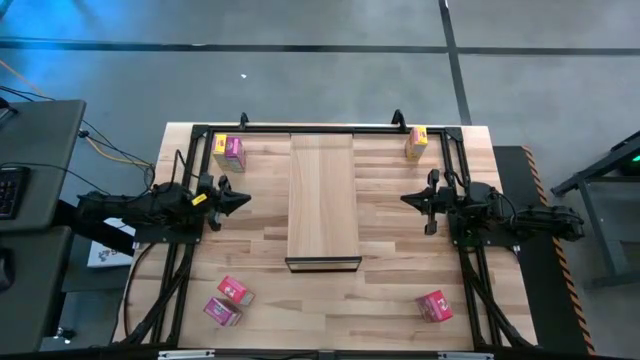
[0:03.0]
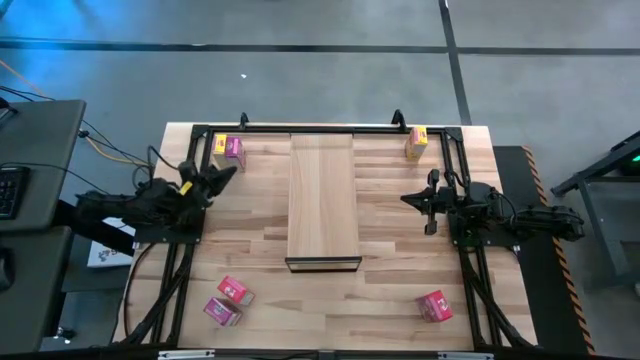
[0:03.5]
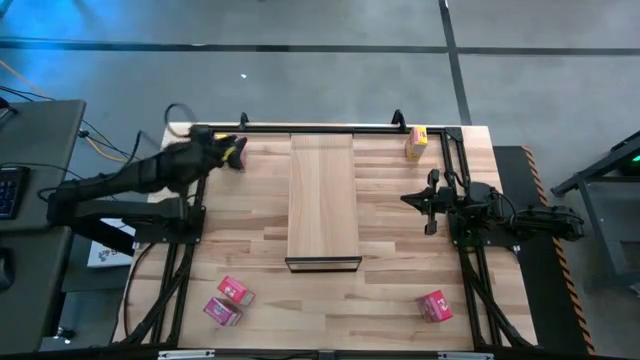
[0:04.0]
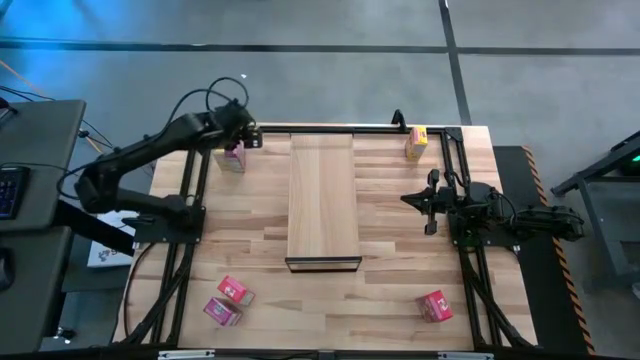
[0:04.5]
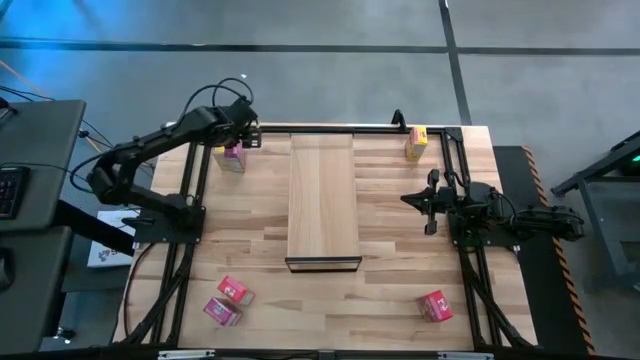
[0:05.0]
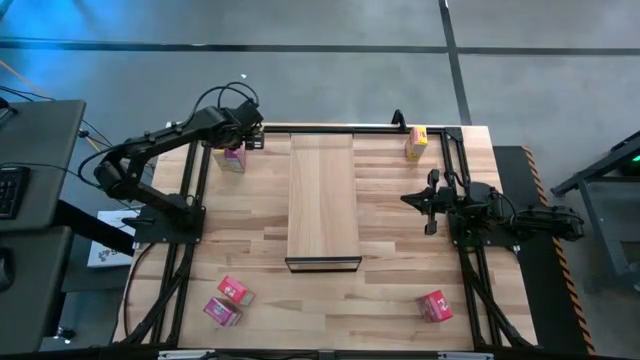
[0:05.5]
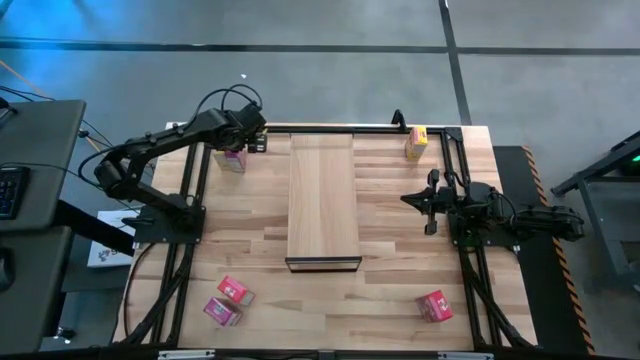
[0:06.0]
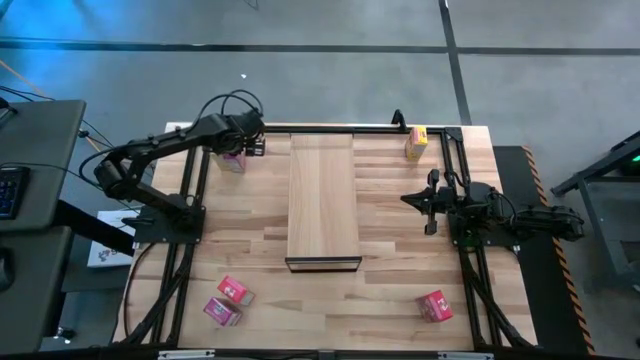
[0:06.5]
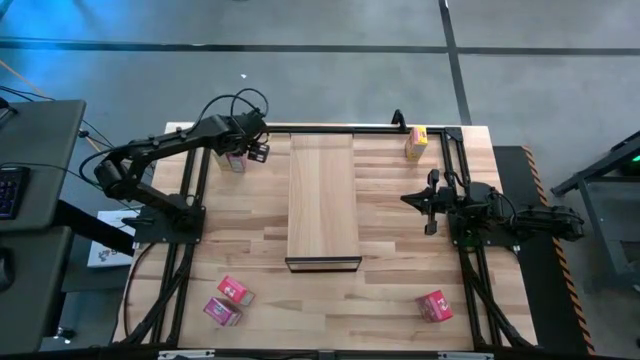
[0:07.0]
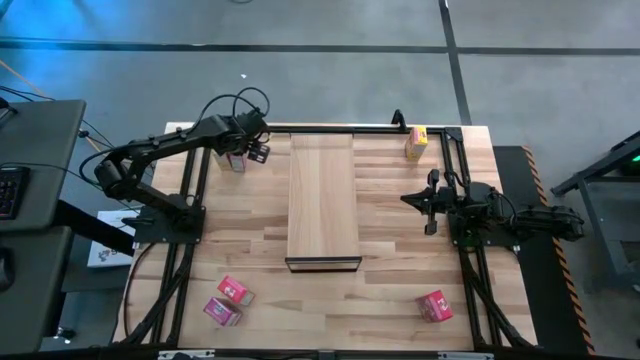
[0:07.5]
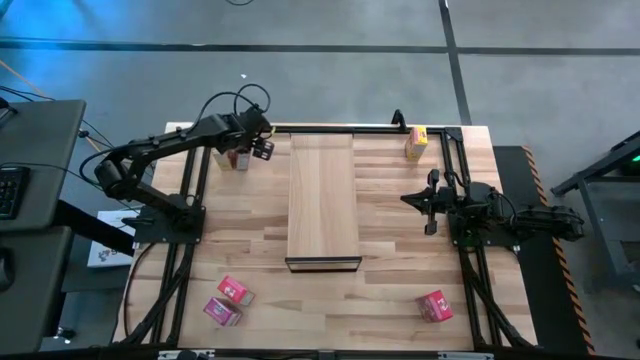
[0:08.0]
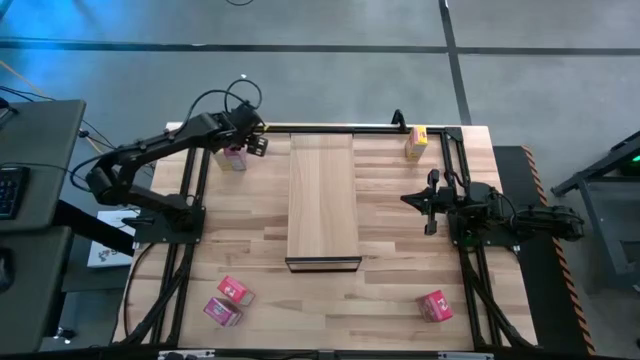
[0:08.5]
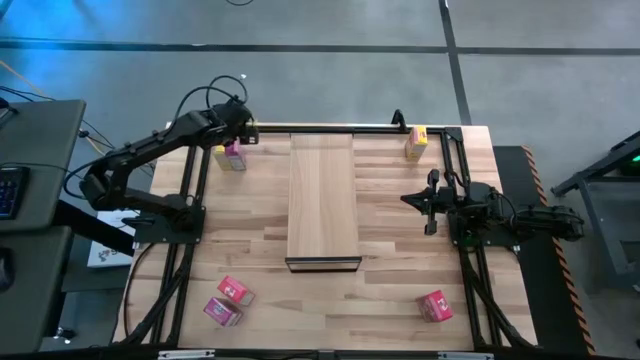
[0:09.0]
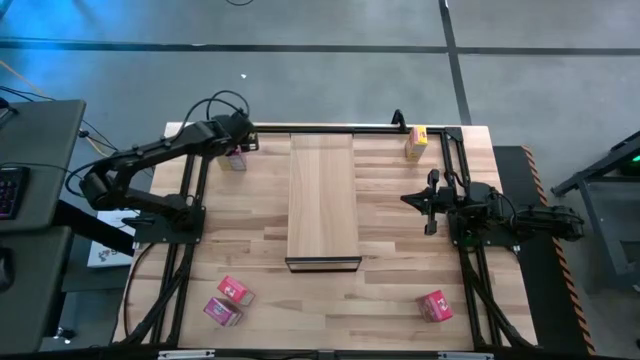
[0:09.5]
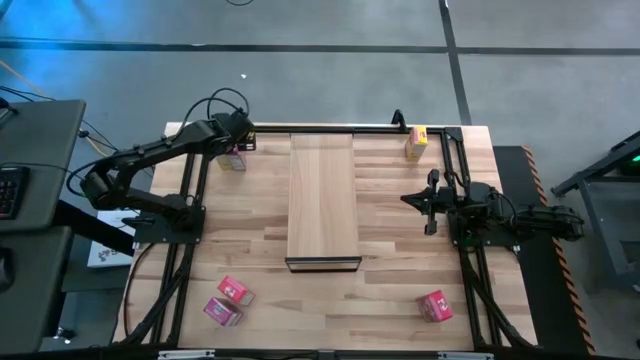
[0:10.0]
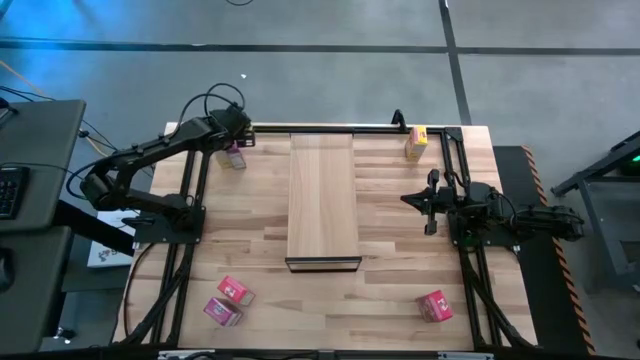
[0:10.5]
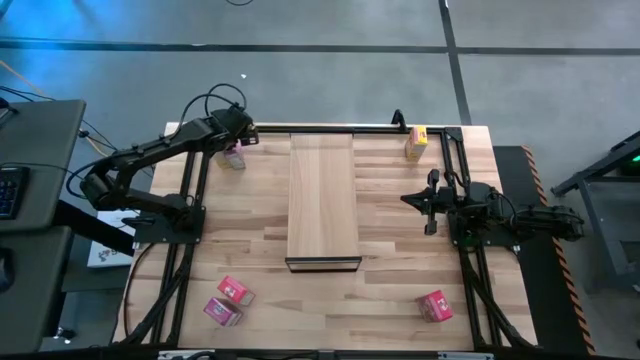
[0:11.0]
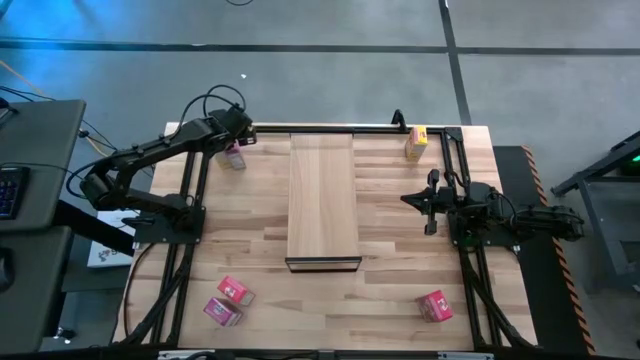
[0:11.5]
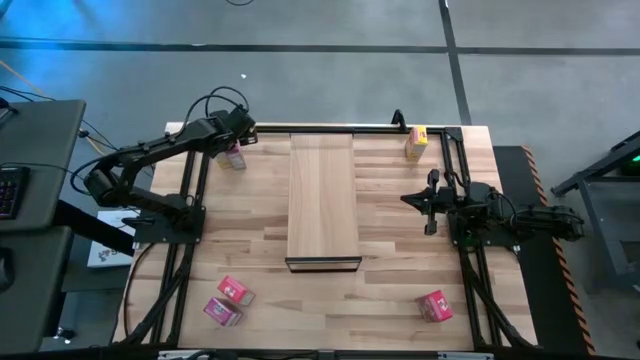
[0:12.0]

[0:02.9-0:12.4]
Task: Stack cereal on shelf
Put the top purple cereal box on the shelf

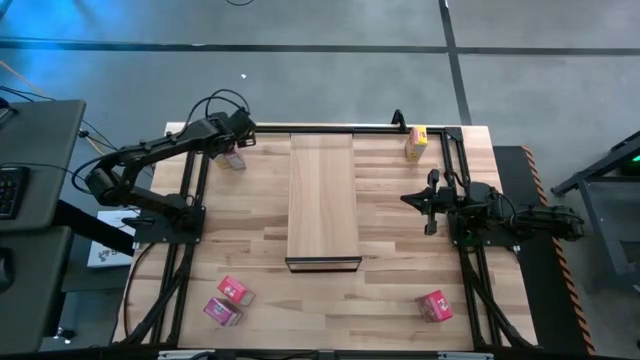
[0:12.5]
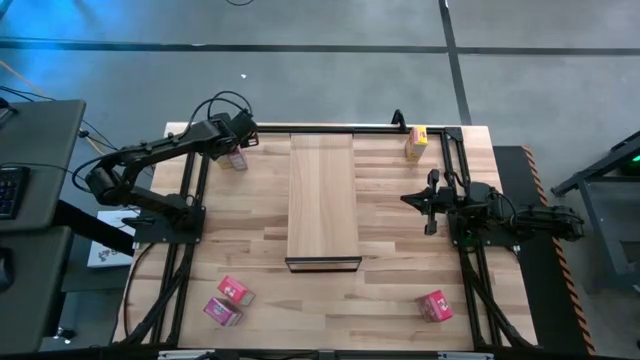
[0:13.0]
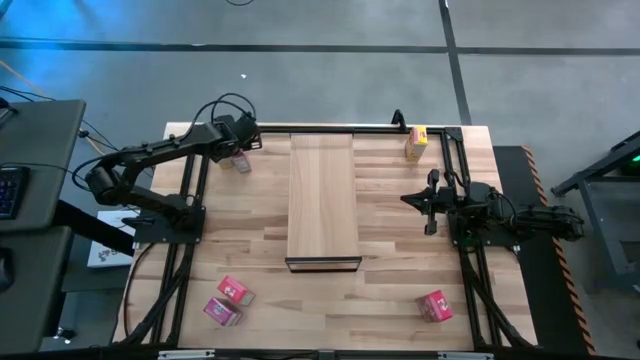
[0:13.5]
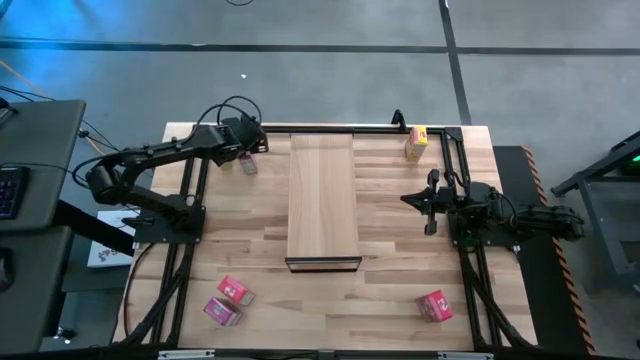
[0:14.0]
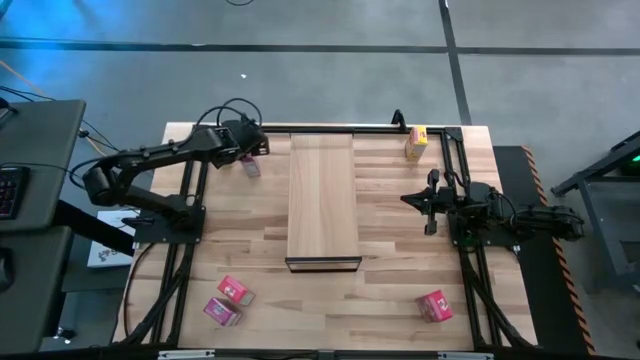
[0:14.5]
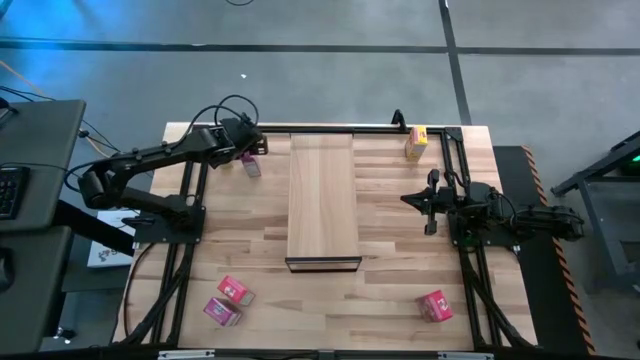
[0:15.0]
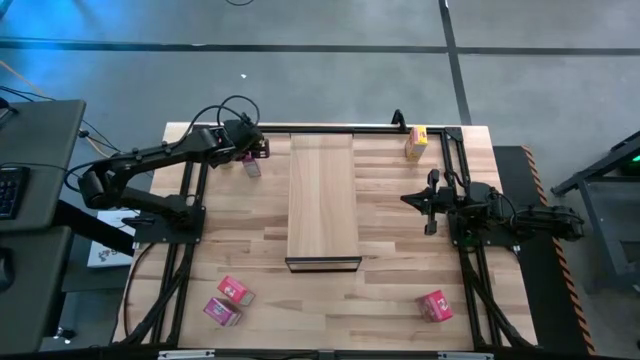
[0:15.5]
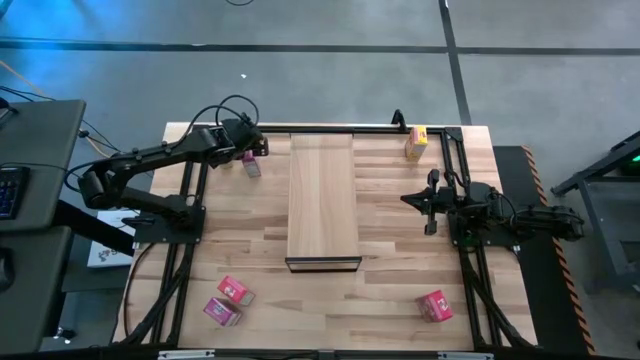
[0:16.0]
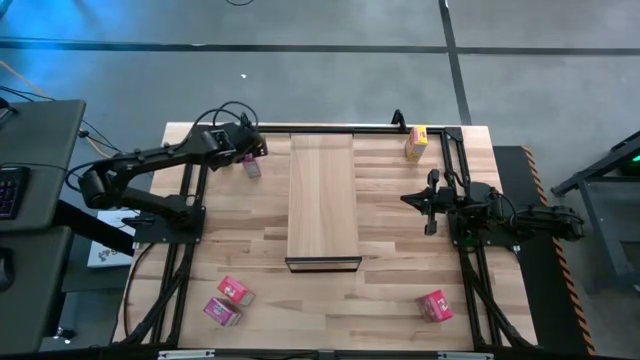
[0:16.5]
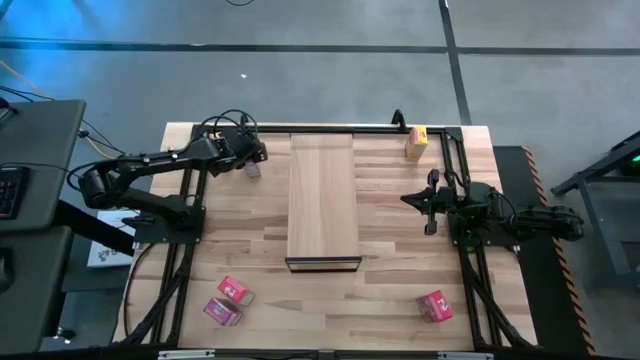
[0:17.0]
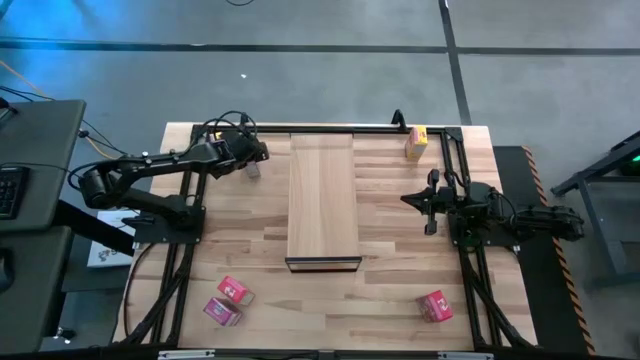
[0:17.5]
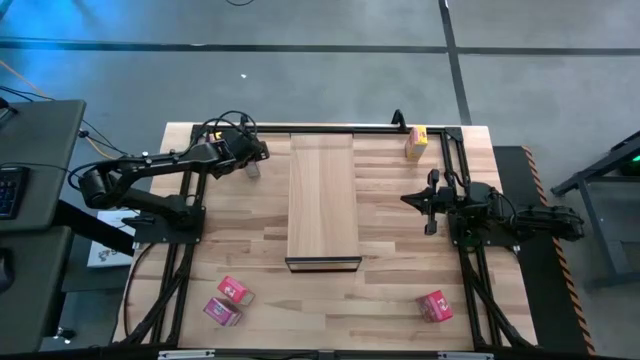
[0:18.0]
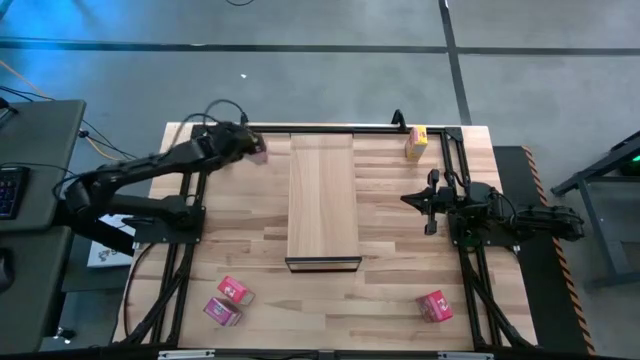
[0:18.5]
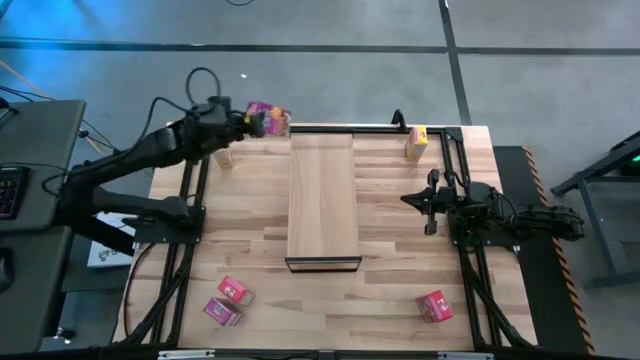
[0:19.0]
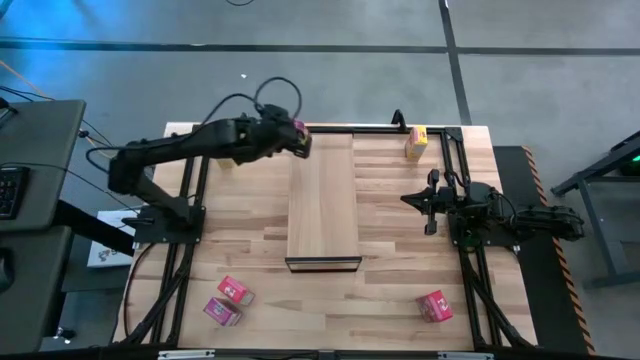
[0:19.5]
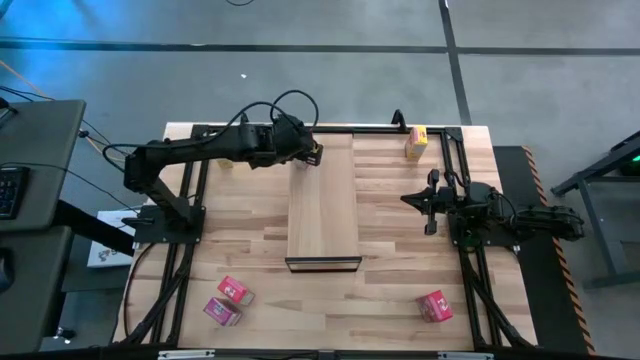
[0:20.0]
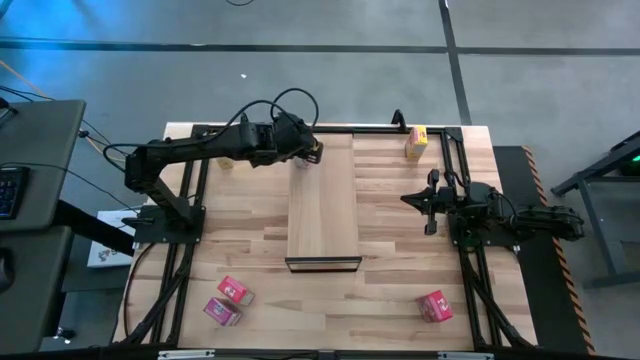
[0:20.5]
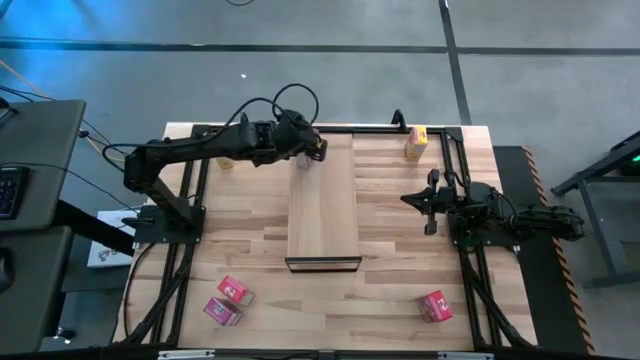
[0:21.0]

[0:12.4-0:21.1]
Put the top purple cereal box on the shelf

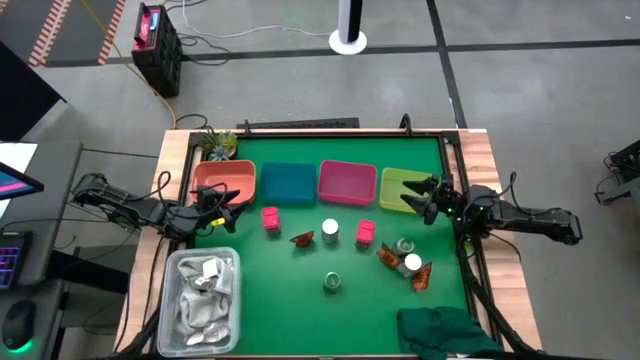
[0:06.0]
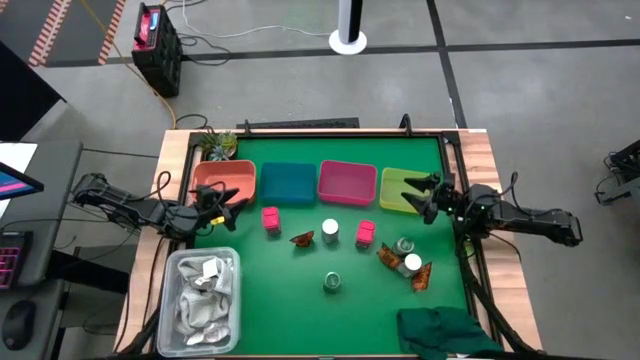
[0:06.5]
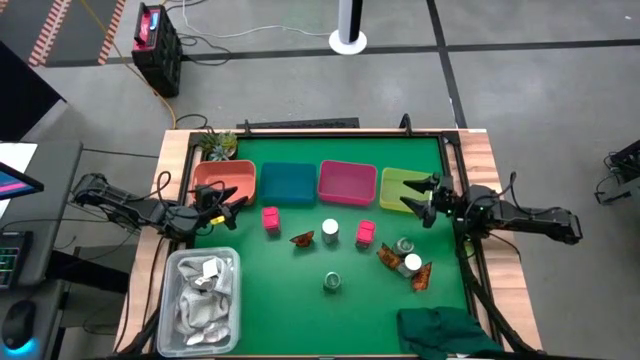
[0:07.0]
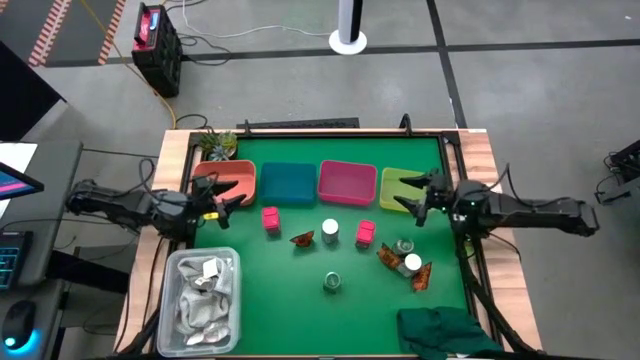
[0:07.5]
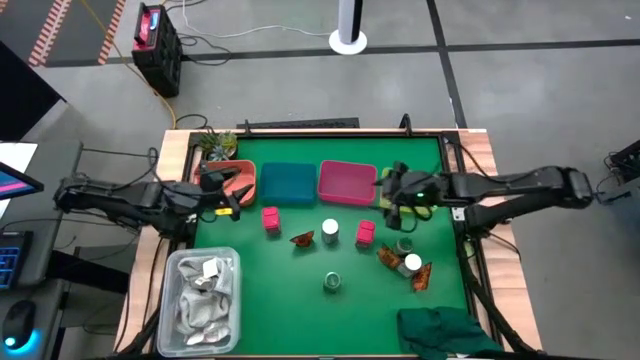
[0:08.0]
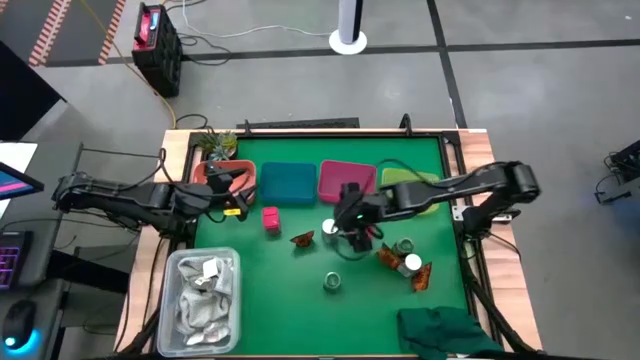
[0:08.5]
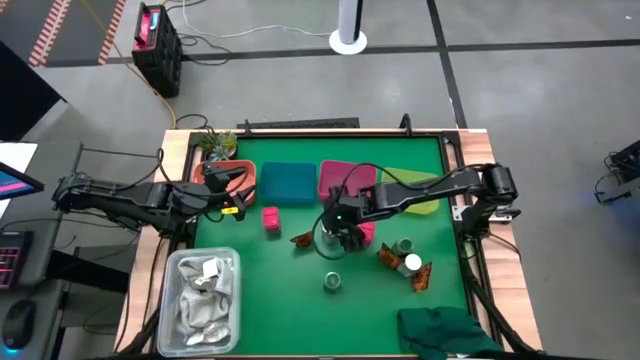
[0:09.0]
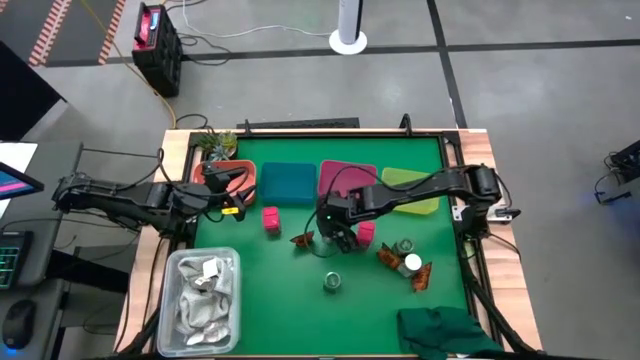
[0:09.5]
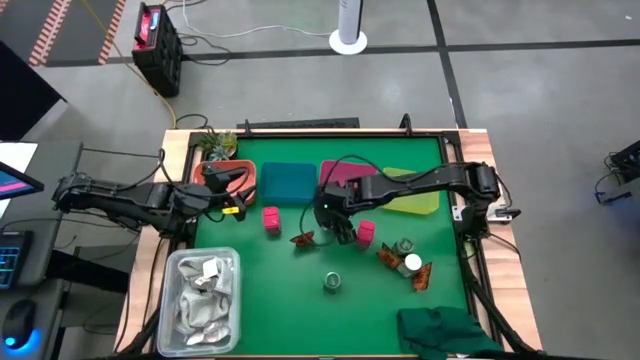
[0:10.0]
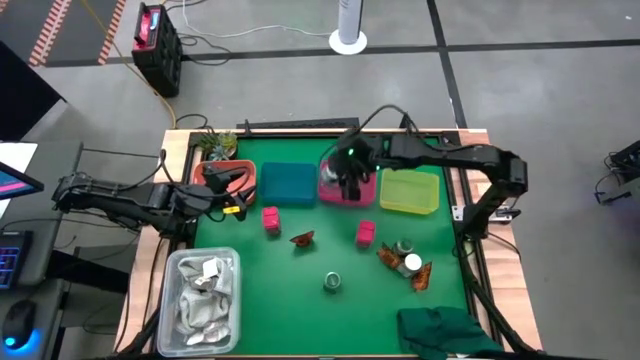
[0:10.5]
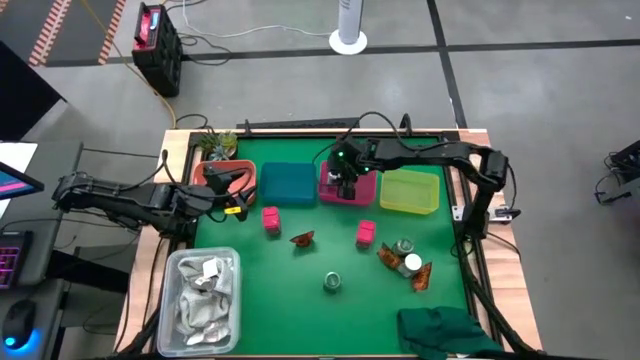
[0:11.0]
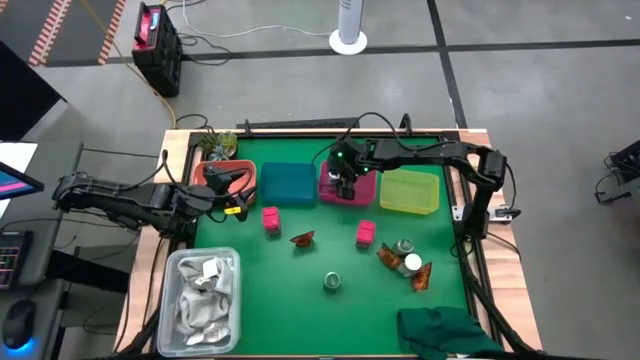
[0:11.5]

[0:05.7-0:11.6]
Task: Sort spices by type
Put the left white seasoning bottle into the red bin
